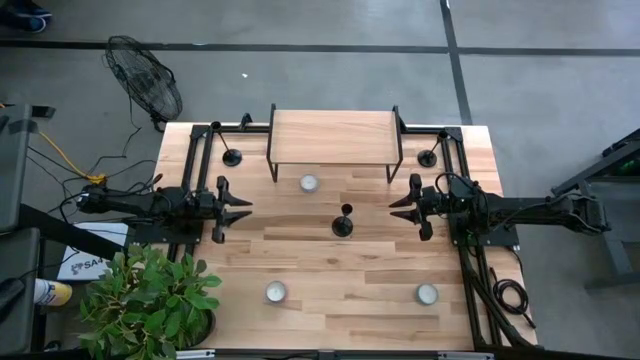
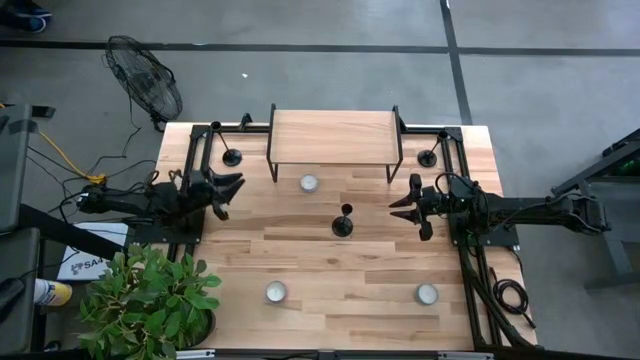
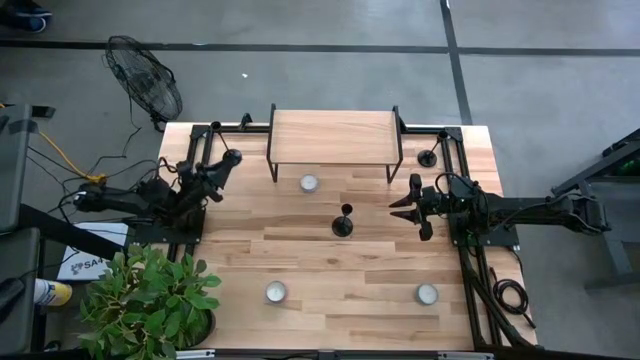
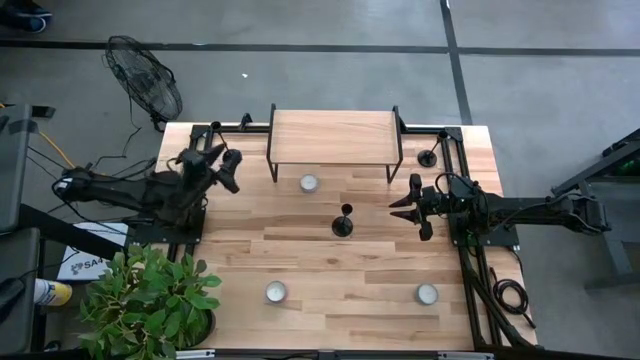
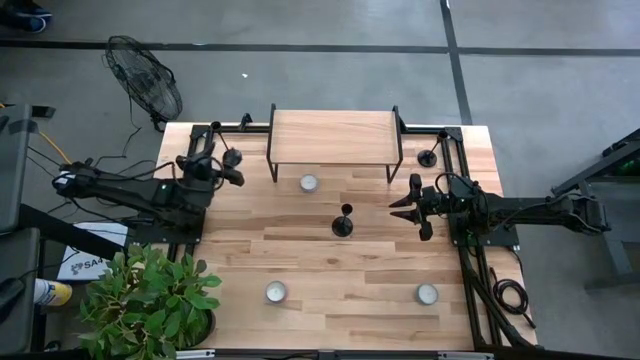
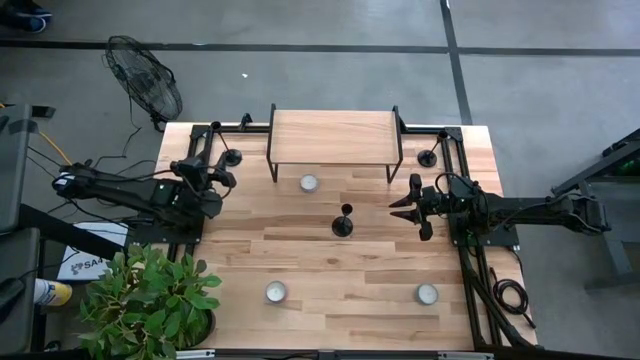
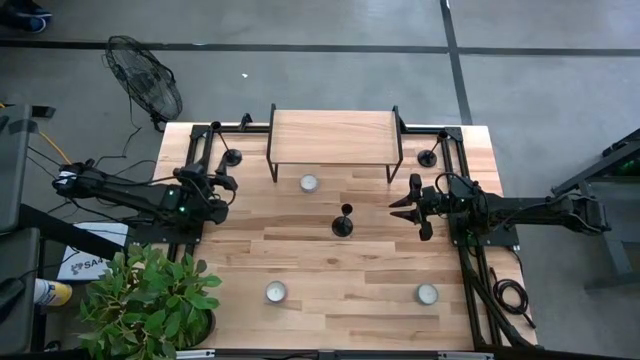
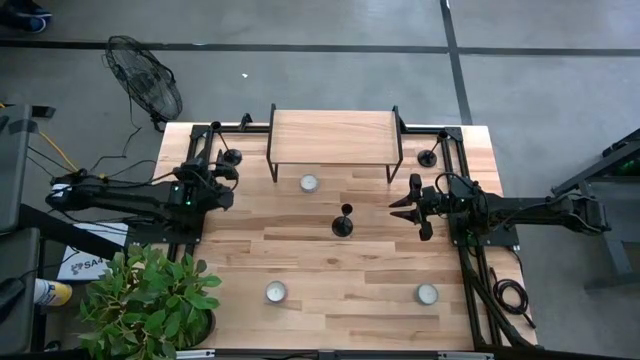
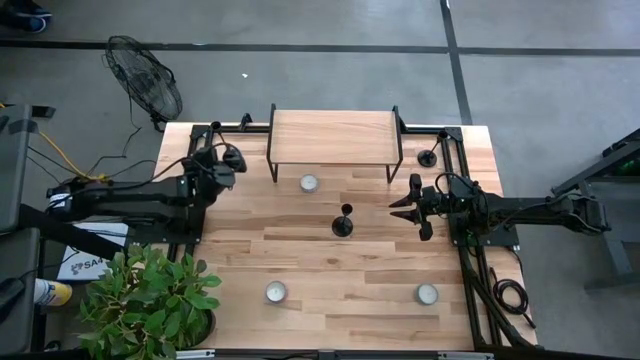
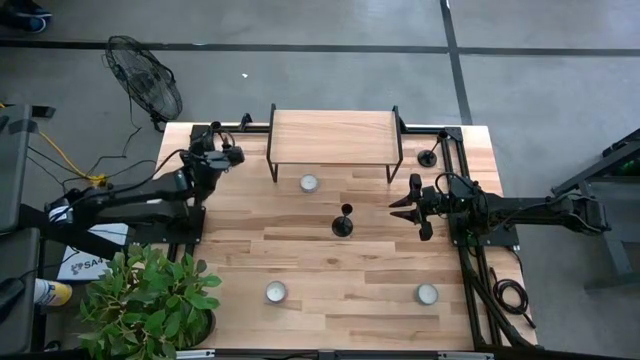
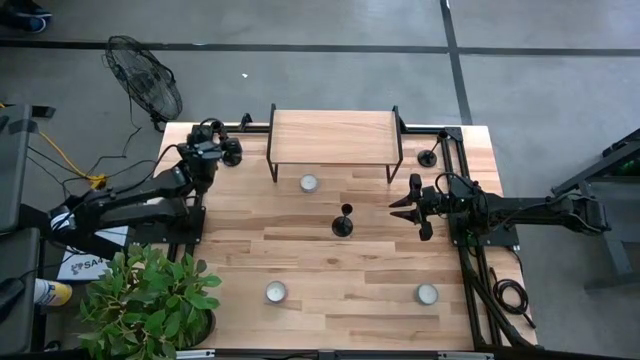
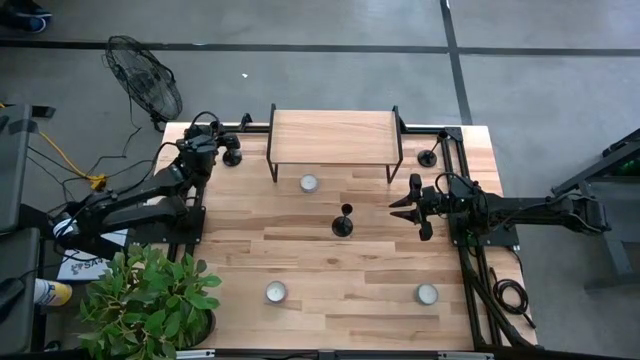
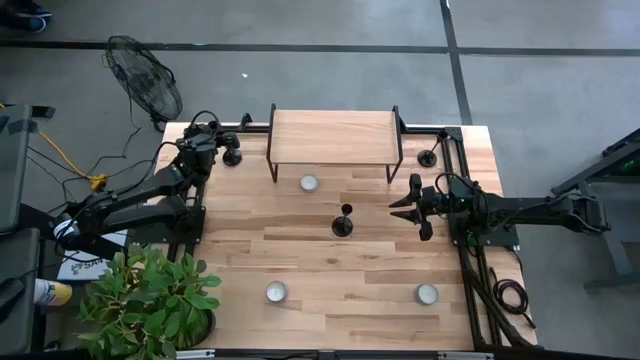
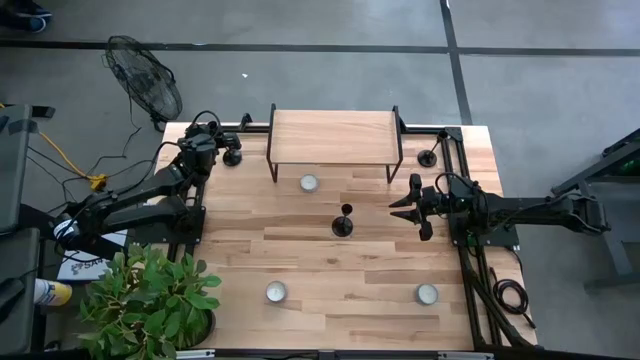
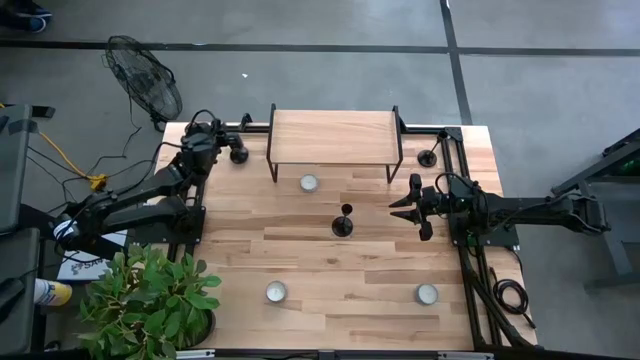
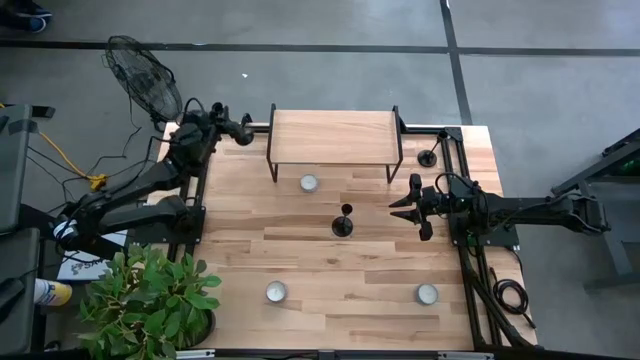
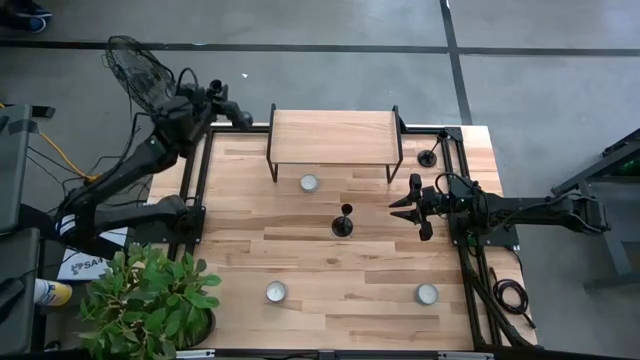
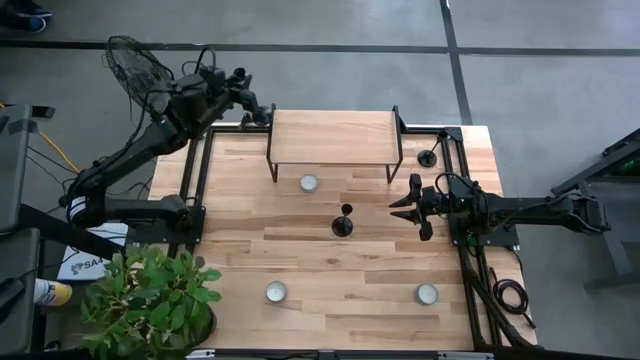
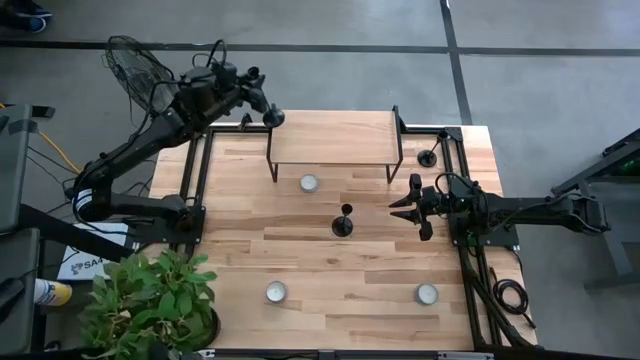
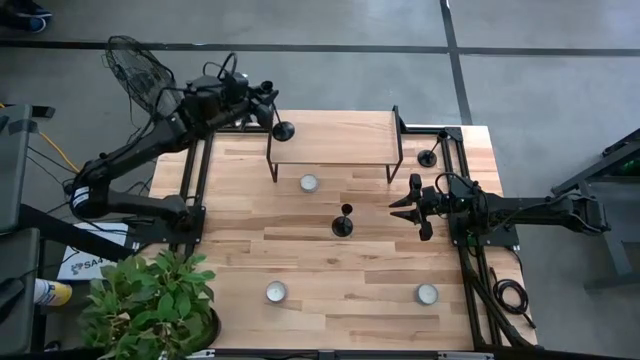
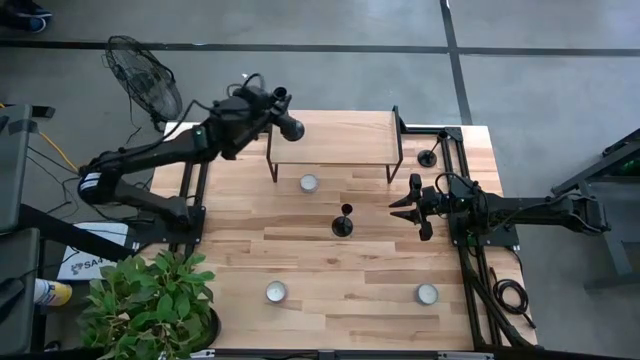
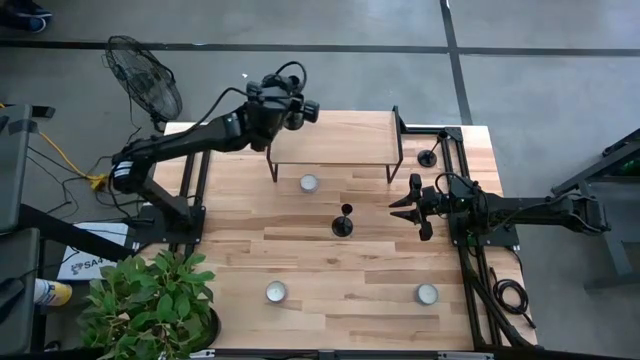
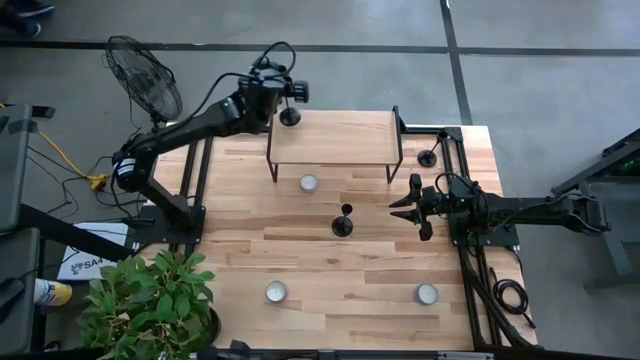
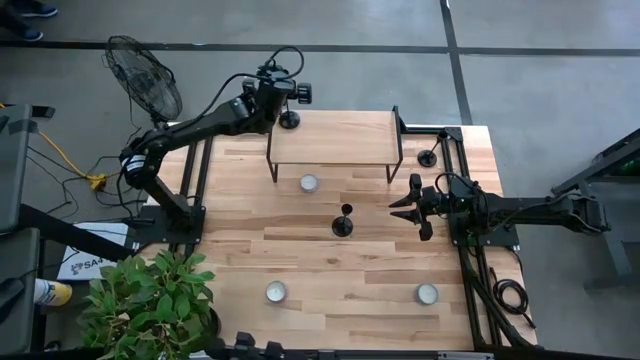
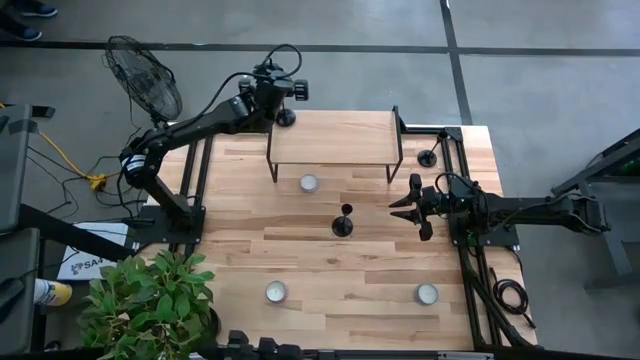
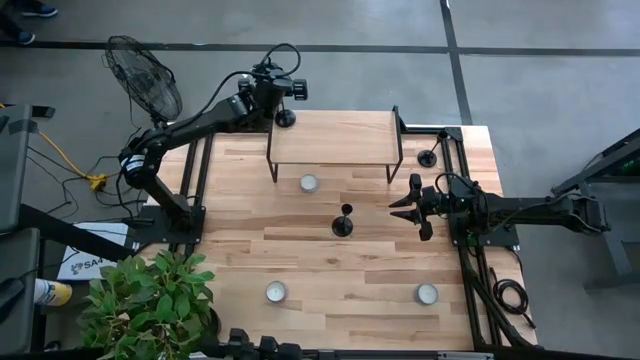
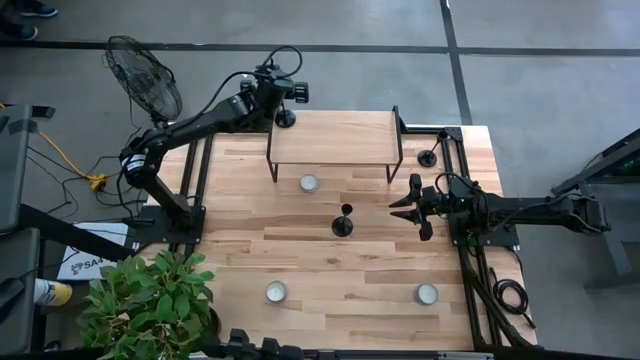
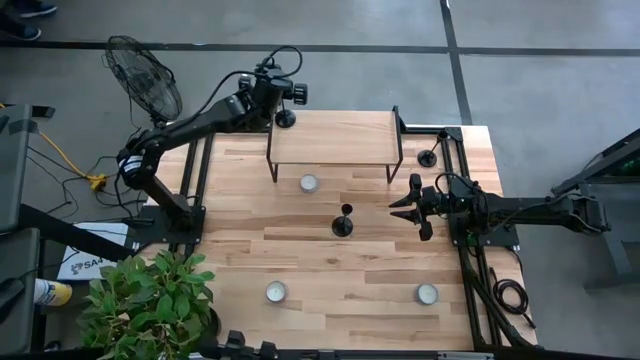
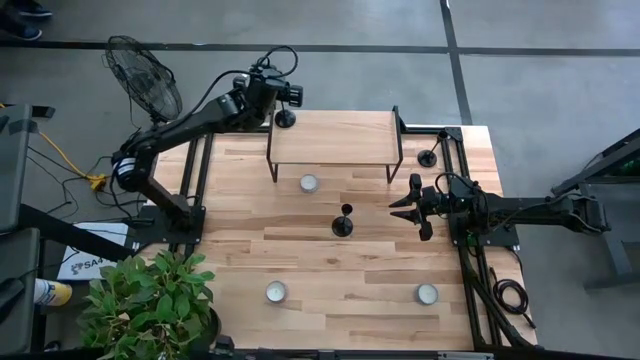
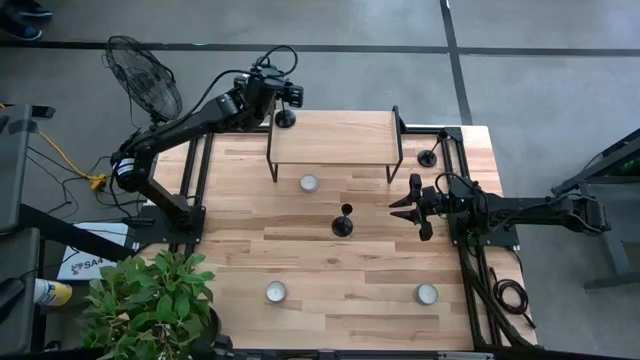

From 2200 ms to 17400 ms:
Task: Pick & Place candle stick holders
Put the top left black candle holder on the shelf

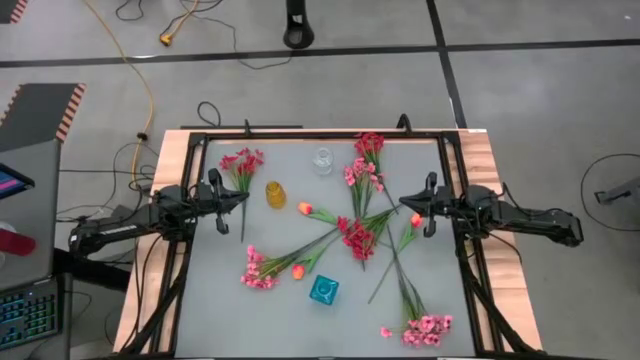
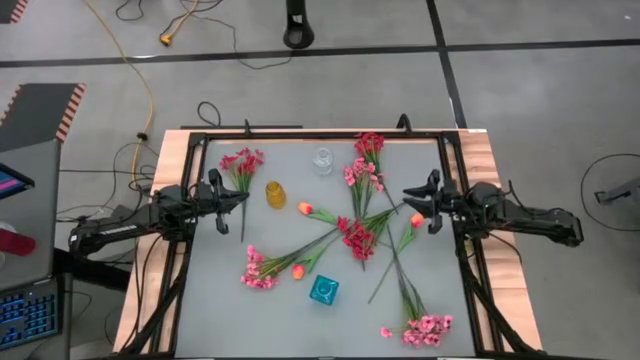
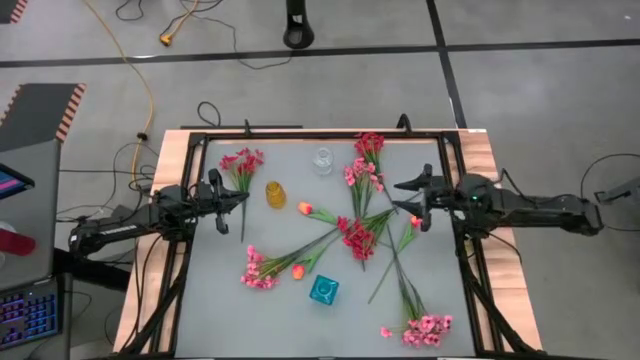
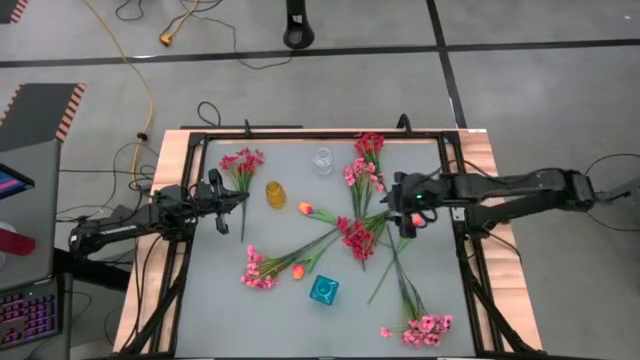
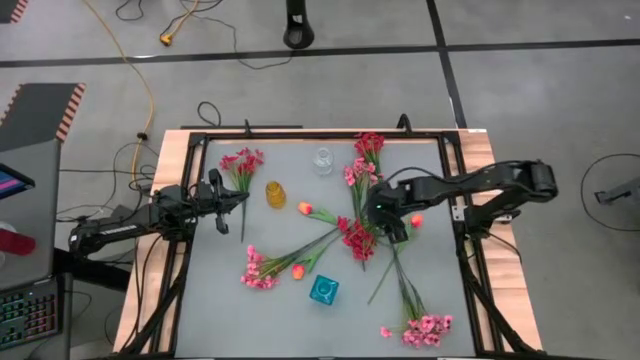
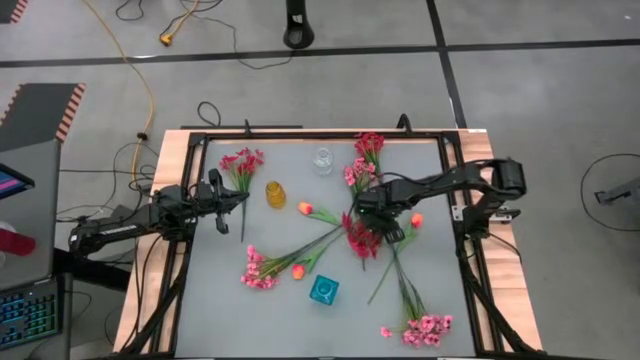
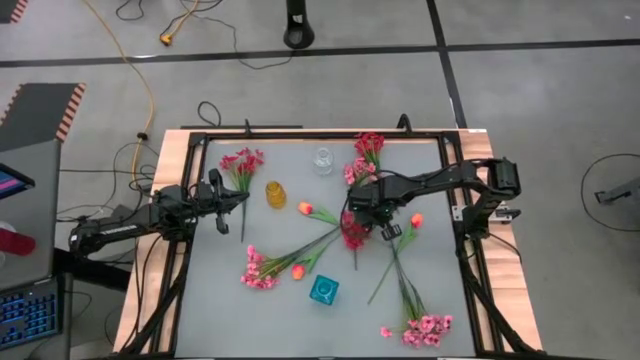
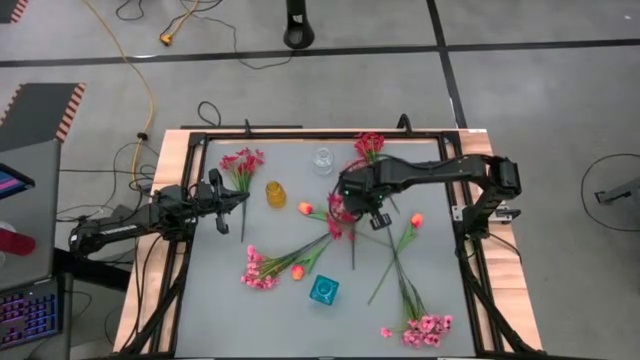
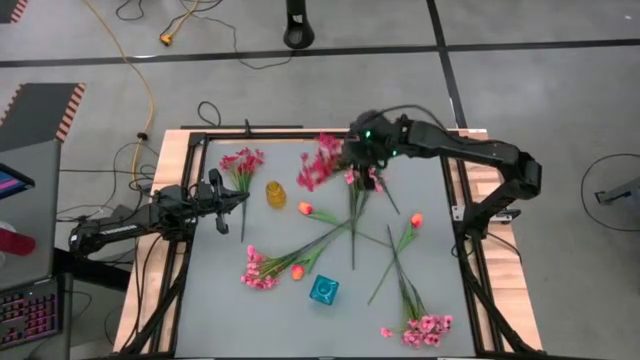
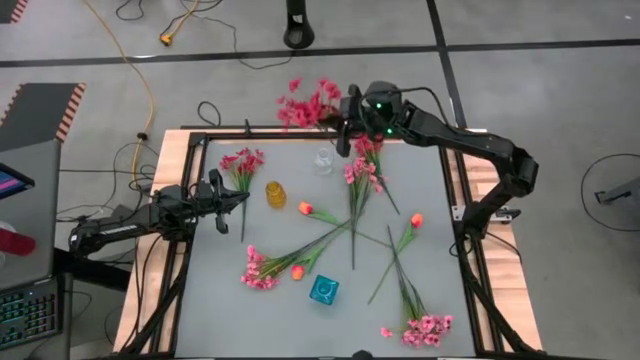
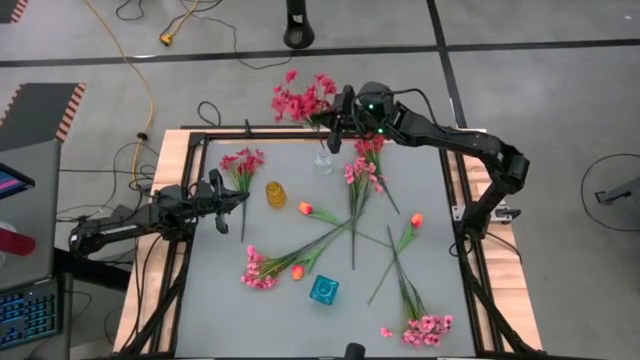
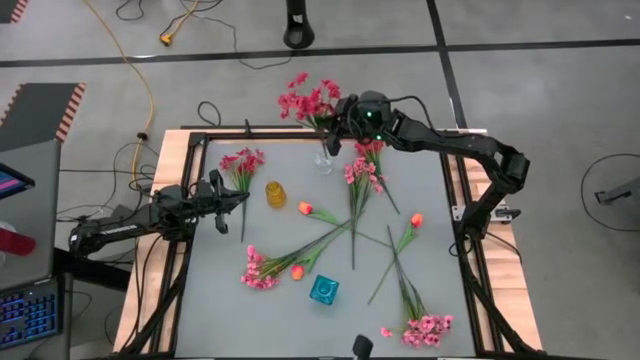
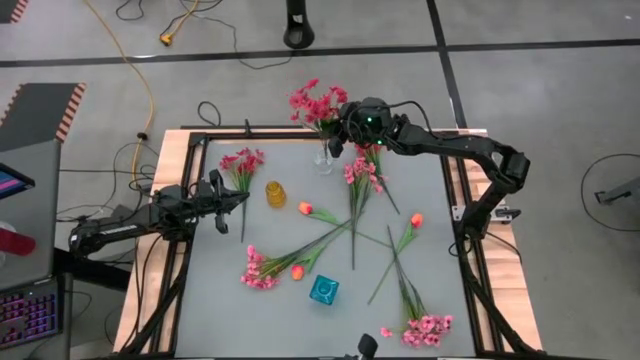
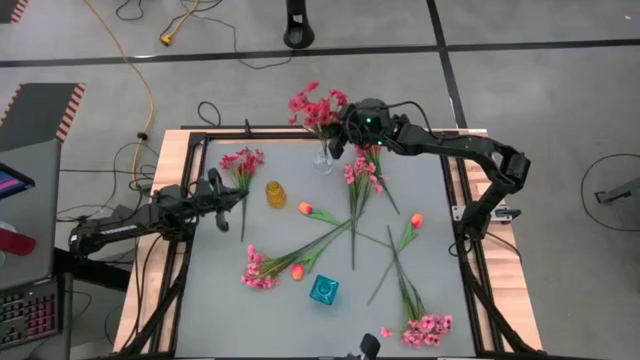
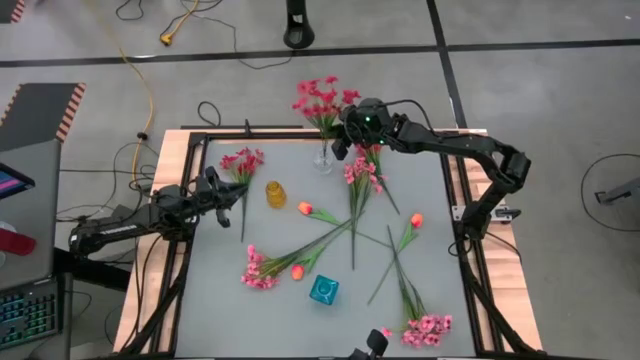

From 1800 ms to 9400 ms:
Task: Sort flowers into vase by color
Put the bottom red flowers into the transparent vase
